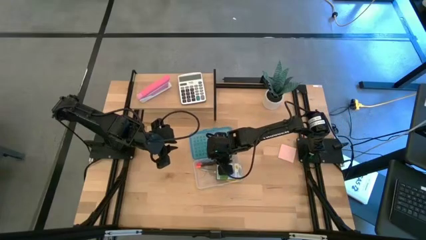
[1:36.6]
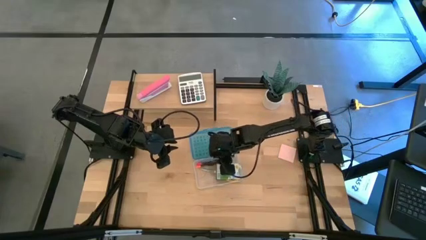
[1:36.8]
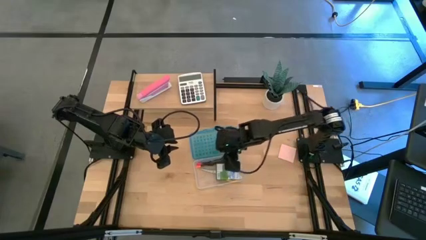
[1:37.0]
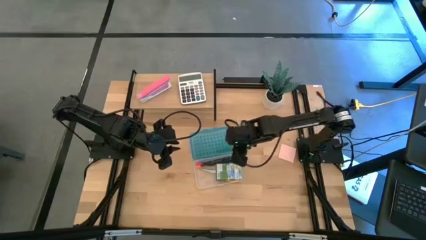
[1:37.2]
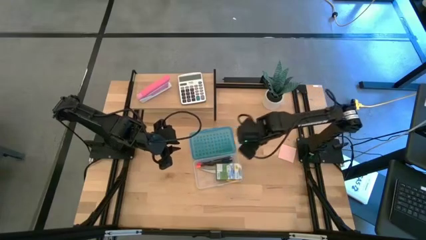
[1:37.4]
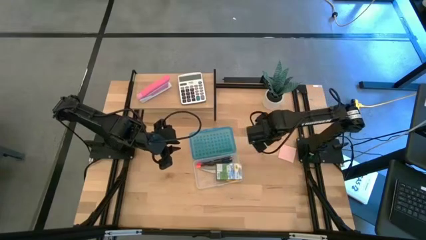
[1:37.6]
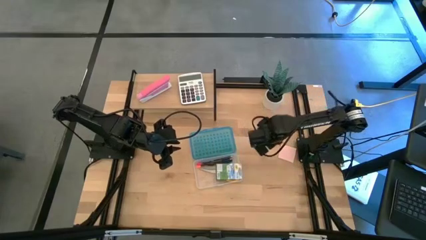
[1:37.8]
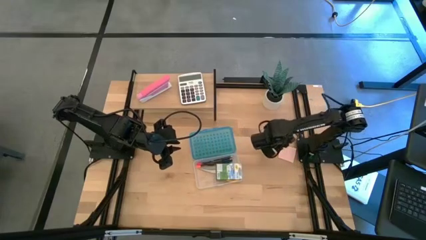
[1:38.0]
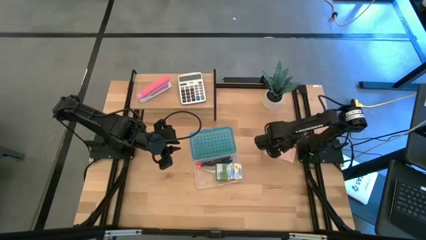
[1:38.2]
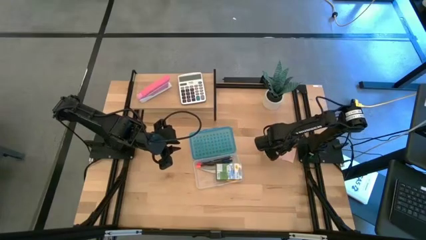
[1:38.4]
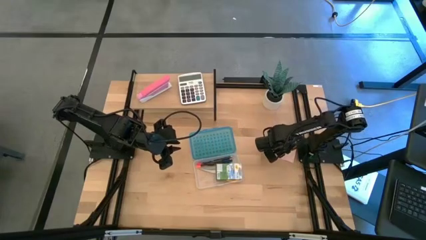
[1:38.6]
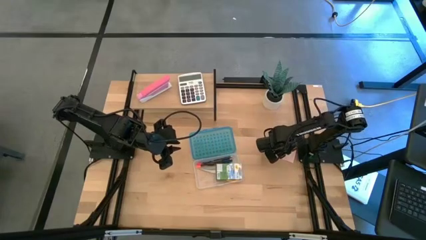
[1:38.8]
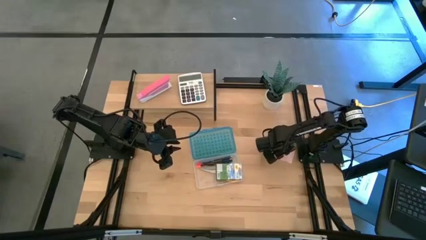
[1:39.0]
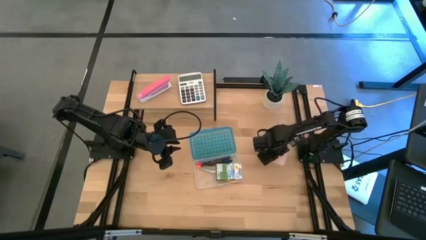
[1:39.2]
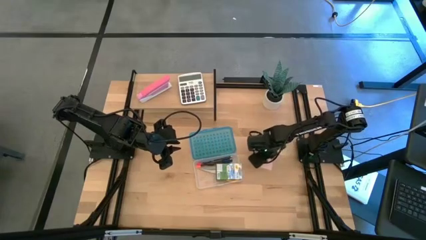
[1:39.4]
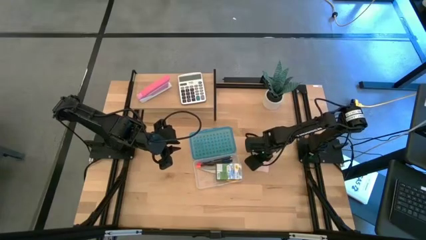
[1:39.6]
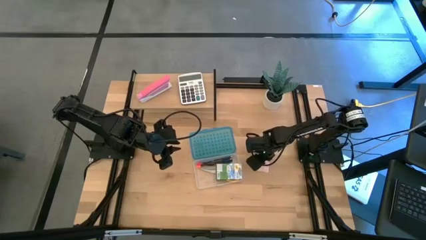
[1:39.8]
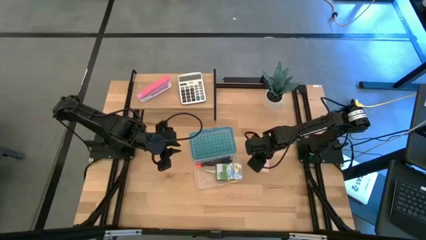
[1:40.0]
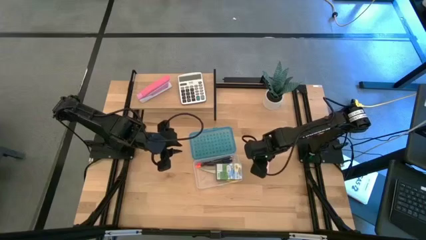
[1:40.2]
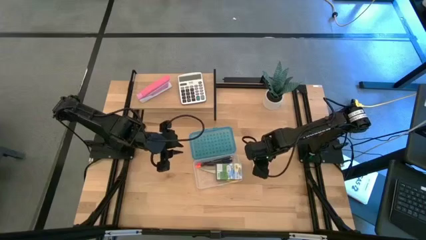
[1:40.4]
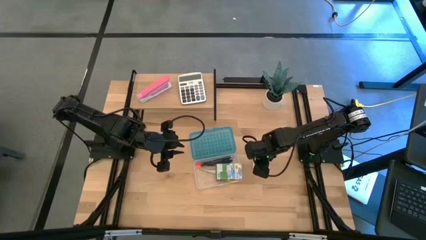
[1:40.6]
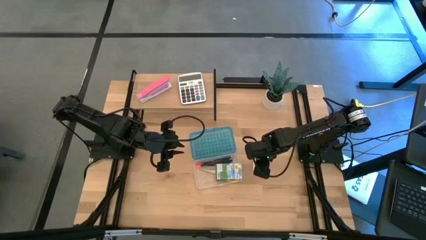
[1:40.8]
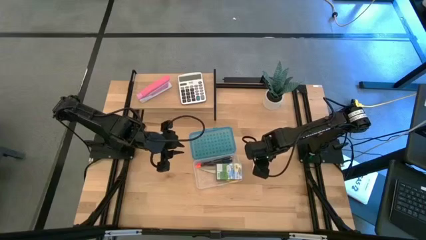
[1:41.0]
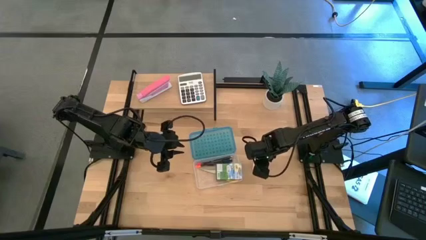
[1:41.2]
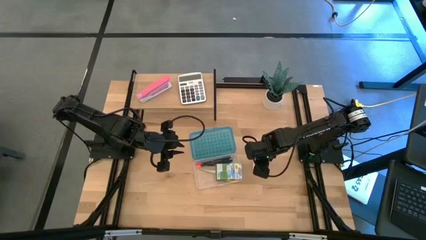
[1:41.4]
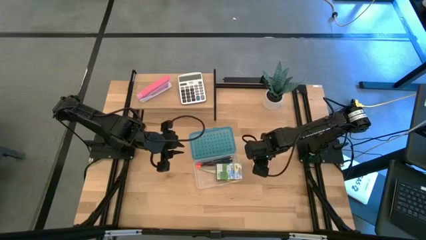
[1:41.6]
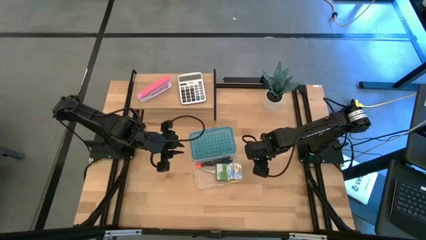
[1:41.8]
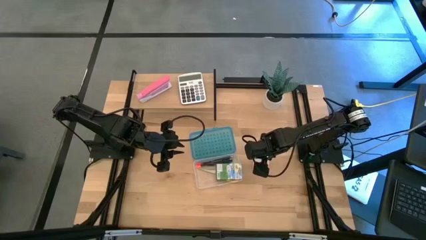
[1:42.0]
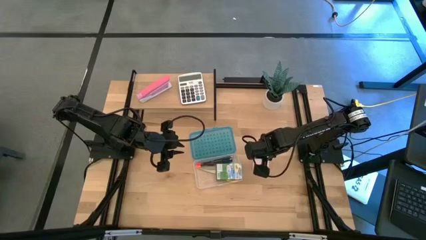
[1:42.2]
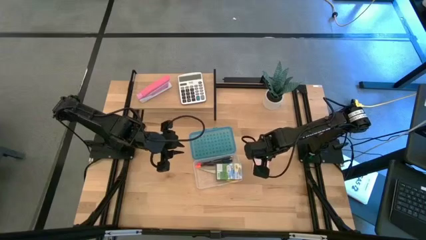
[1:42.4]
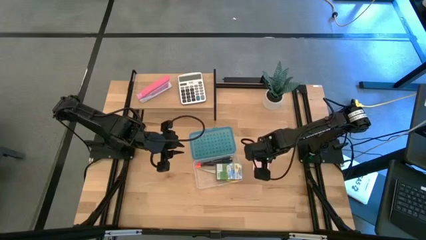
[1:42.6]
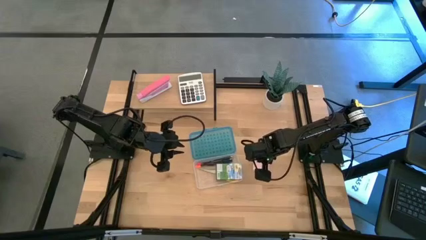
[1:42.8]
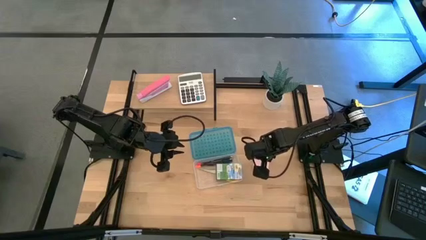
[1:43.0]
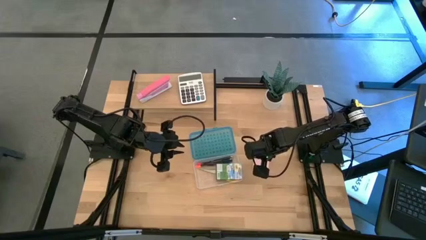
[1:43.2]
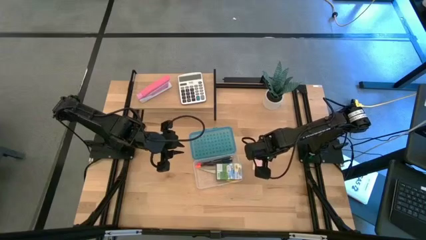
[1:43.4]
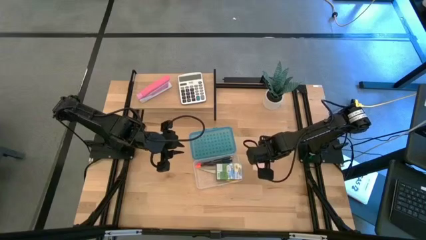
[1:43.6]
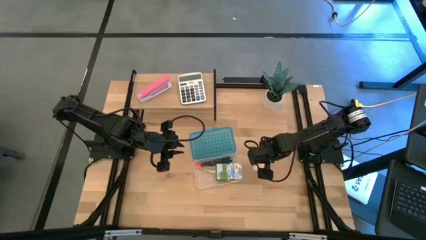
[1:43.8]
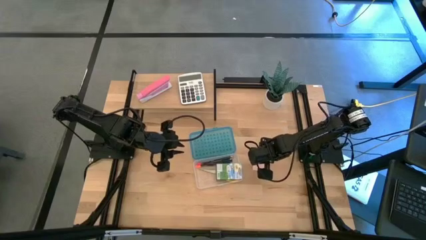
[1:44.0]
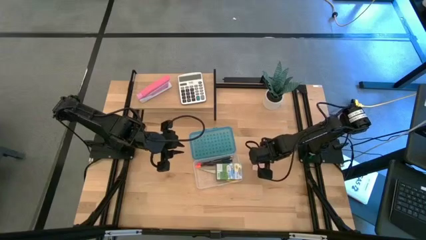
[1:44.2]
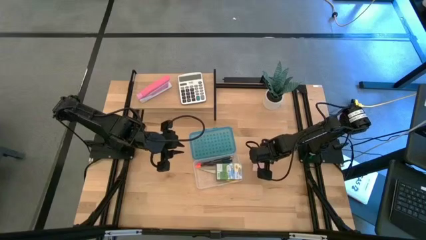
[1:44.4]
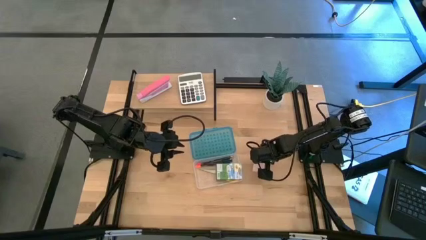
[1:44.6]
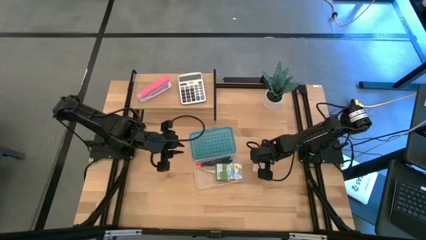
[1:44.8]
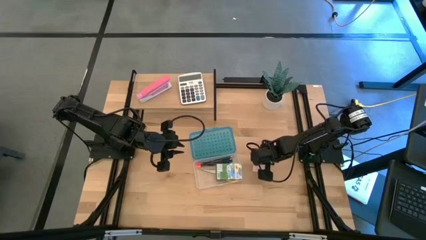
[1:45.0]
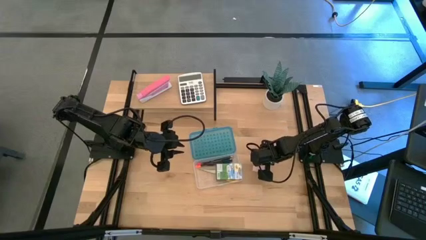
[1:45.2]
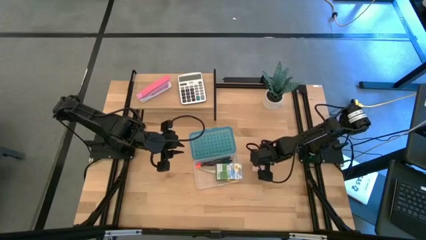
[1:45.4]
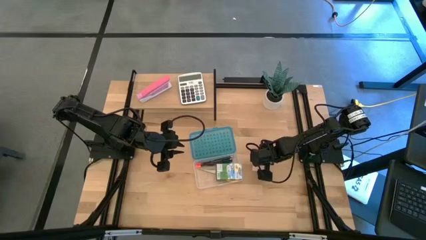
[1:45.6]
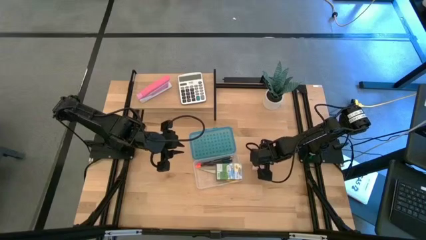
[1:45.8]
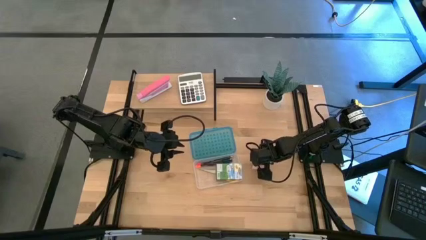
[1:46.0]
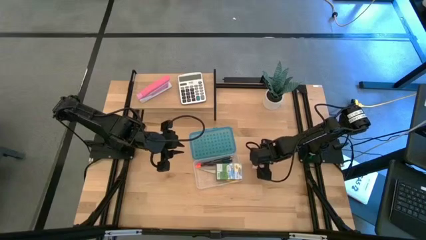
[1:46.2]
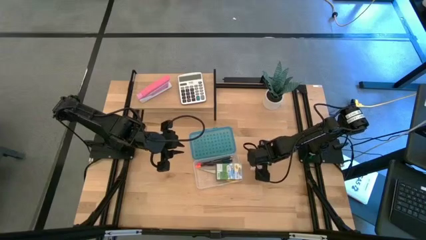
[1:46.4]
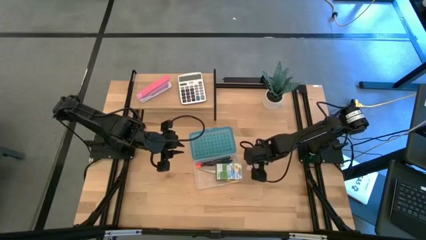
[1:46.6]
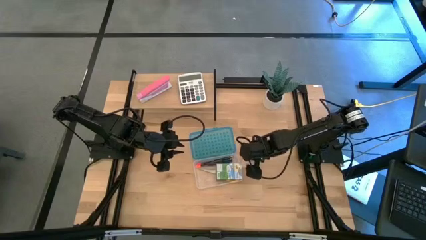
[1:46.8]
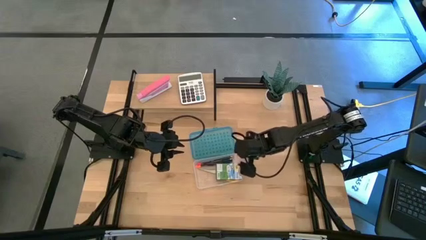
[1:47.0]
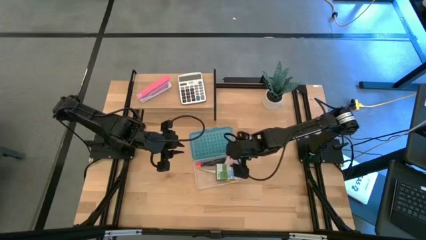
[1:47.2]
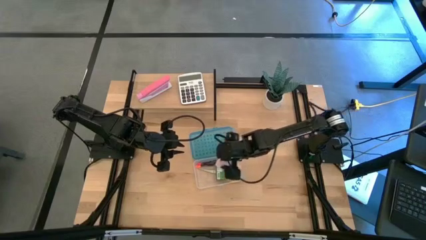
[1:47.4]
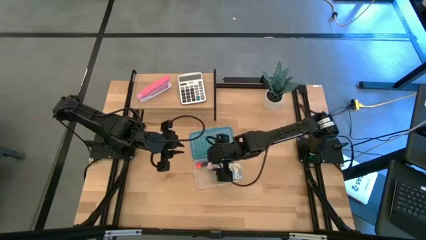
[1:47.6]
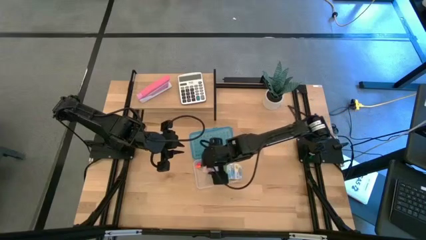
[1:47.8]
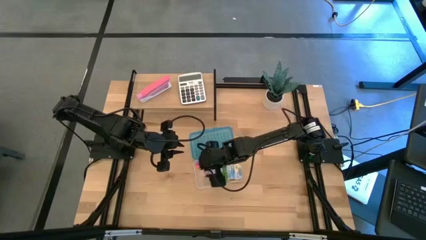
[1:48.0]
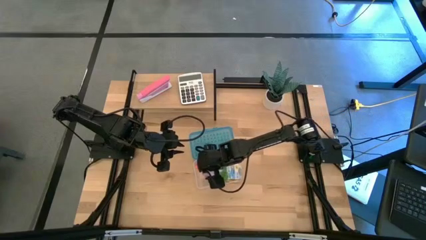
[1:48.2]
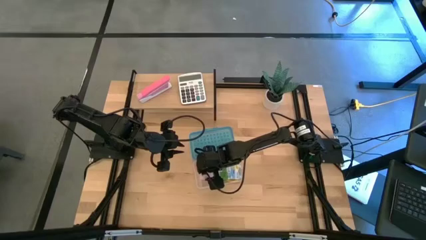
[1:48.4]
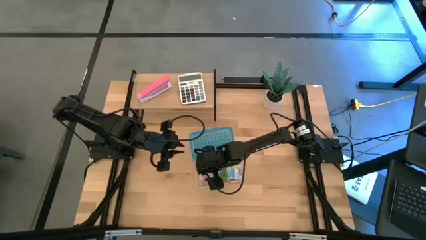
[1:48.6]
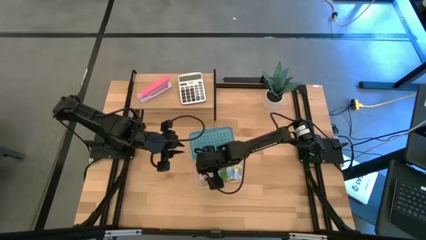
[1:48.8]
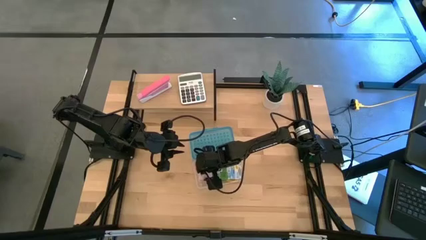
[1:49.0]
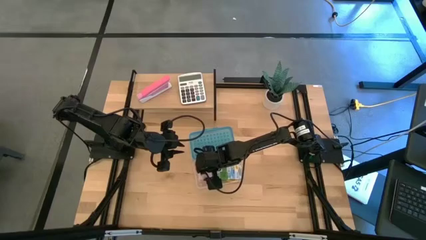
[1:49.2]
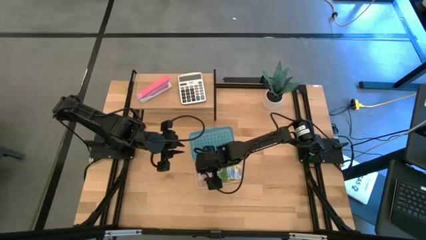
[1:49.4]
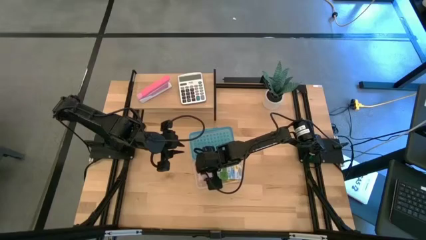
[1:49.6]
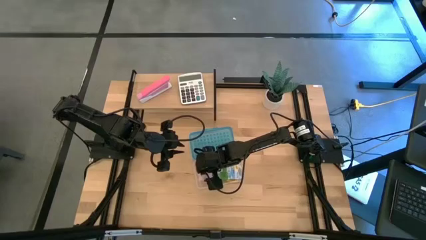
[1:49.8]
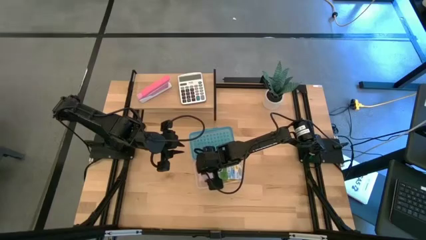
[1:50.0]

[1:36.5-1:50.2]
Task: Pack school essentials
Put the pink sticky note into the blue supply box
